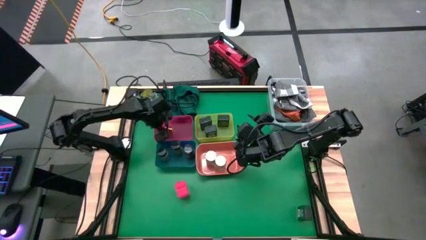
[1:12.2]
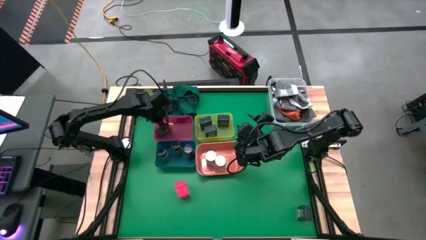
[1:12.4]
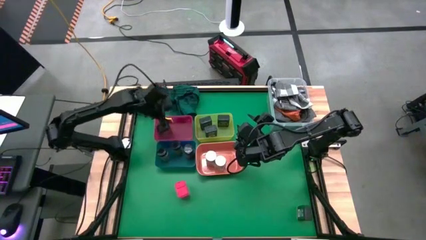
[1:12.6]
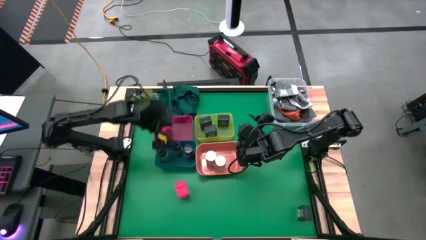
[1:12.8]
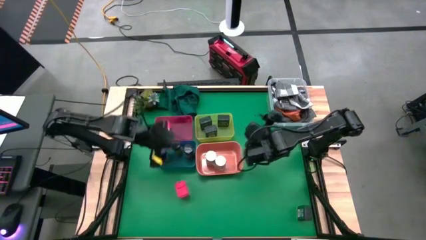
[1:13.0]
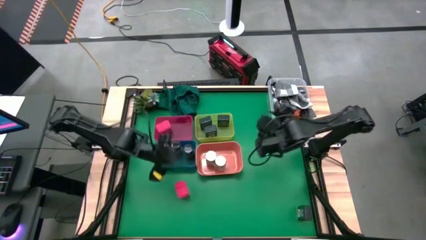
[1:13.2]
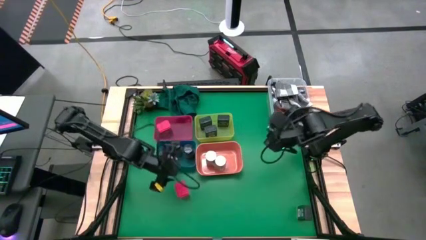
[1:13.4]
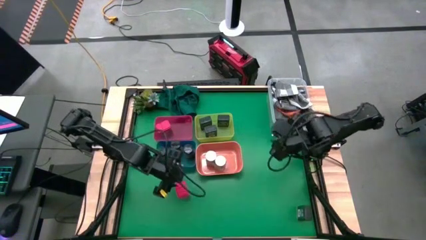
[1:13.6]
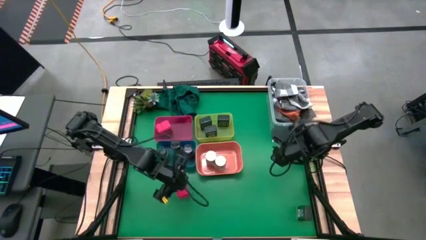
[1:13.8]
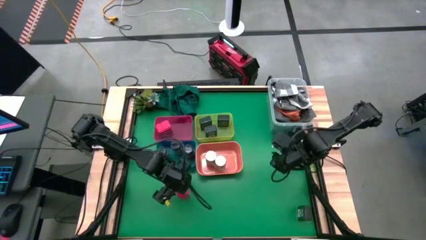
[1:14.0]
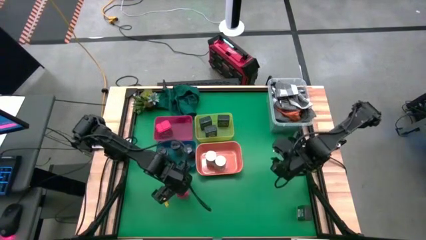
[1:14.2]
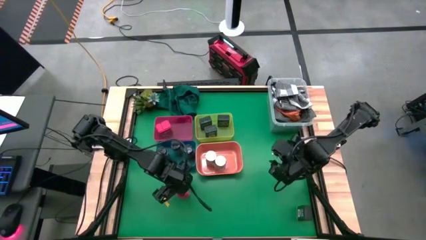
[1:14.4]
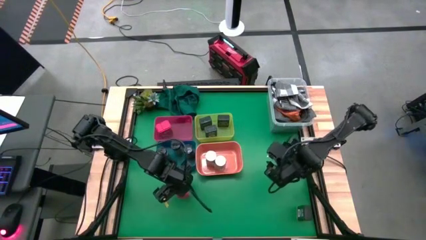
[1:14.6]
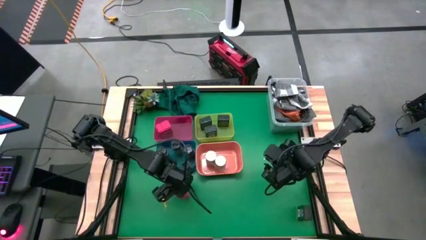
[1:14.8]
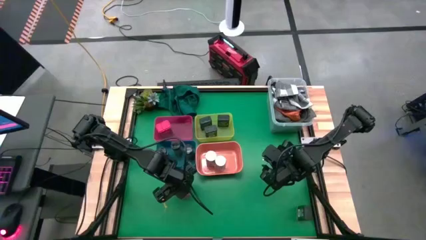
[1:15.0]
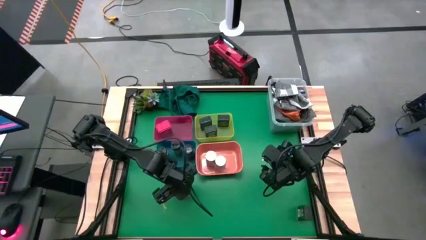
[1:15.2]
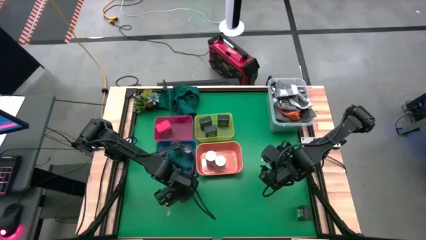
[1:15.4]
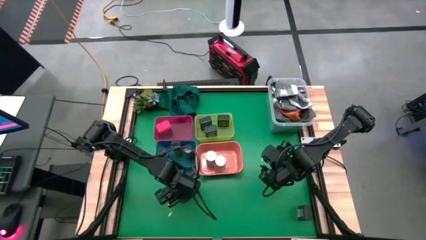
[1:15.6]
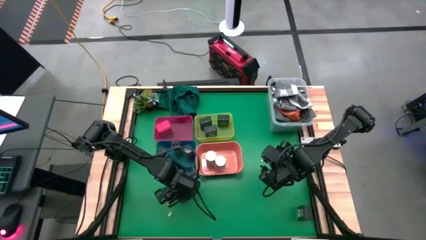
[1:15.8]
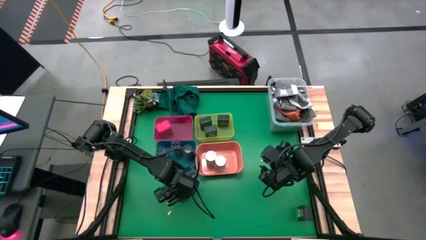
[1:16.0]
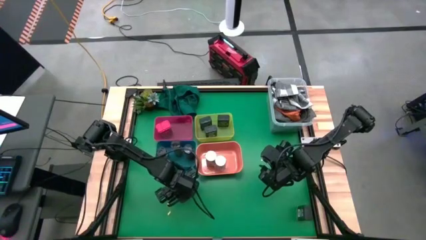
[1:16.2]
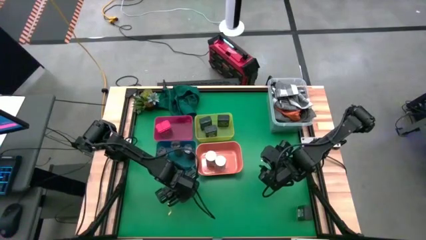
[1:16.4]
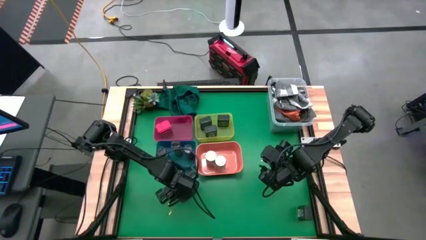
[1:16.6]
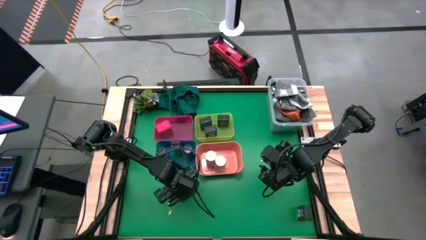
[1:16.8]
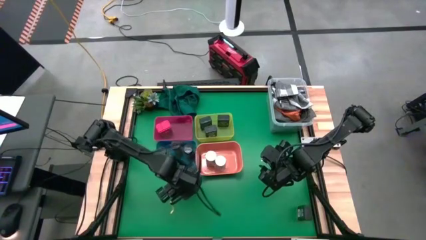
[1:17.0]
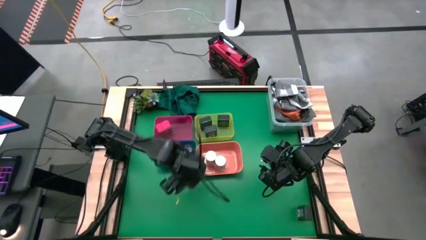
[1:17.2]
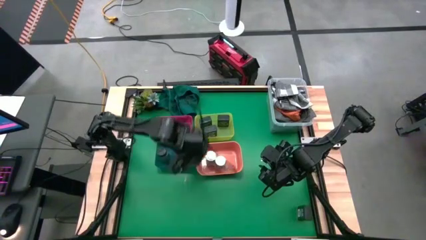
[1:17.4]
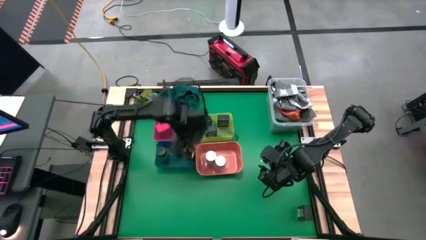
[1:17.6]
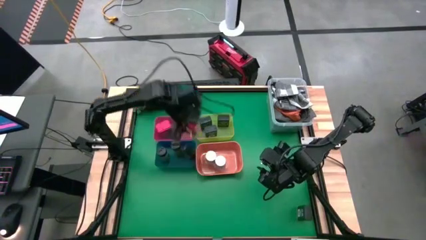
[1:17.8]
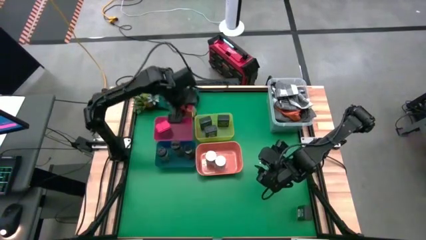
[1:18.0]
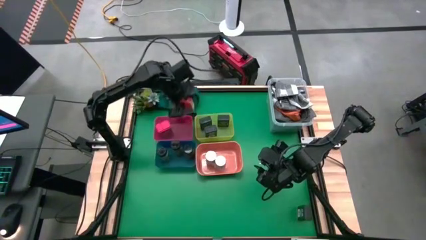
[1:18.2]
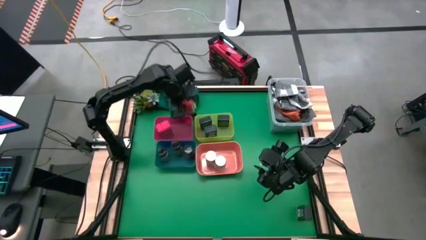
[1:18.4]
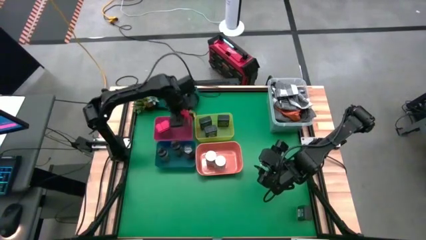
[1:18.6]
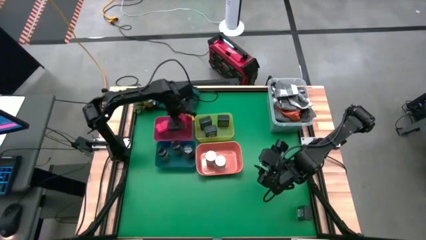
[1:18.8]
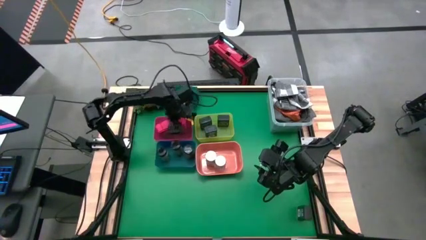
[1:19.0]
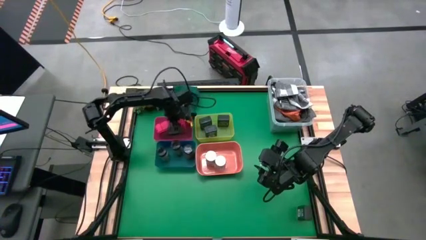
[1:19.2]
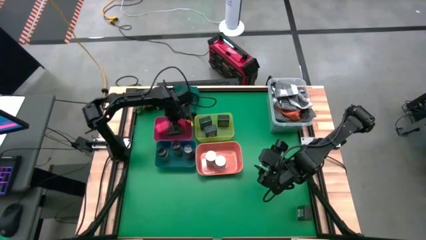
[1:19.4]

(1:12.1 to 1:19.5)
Task: Sort spices by type
Put the red seasoning can into the pink bin

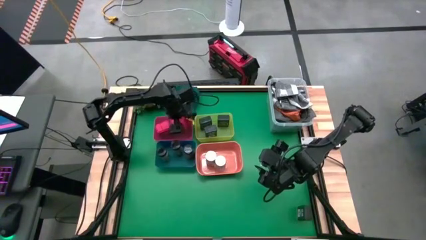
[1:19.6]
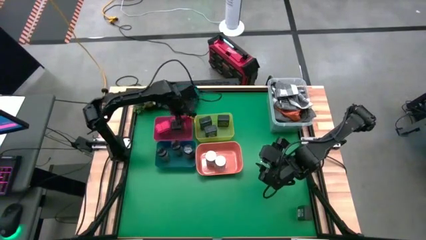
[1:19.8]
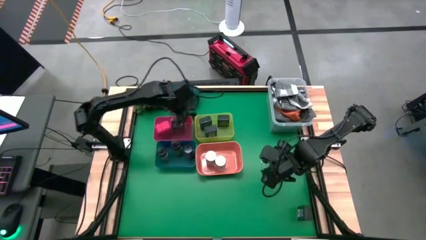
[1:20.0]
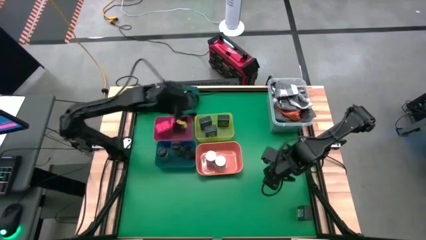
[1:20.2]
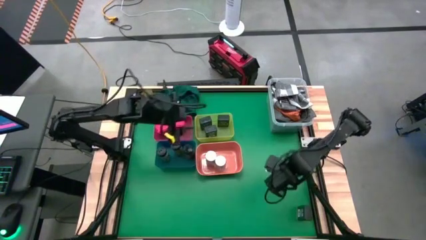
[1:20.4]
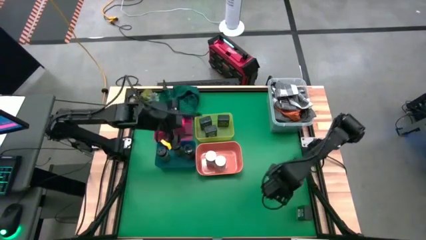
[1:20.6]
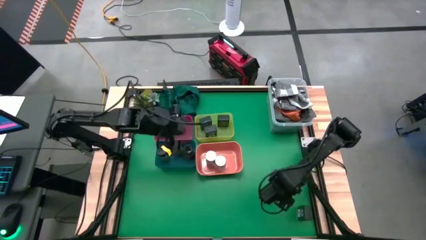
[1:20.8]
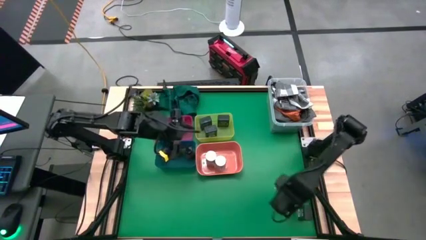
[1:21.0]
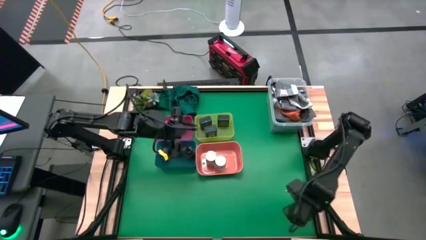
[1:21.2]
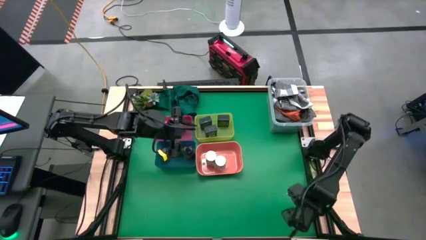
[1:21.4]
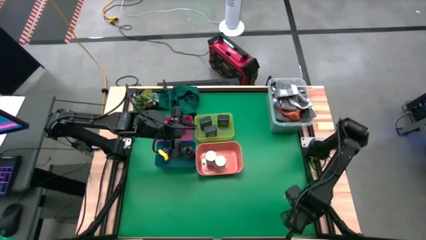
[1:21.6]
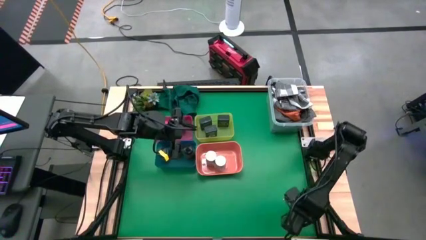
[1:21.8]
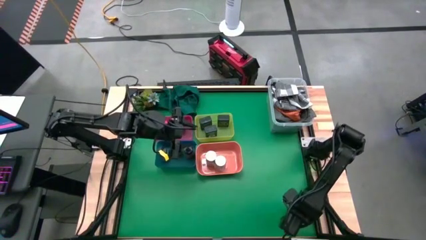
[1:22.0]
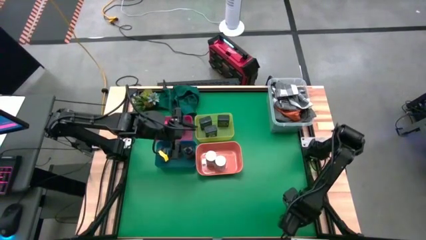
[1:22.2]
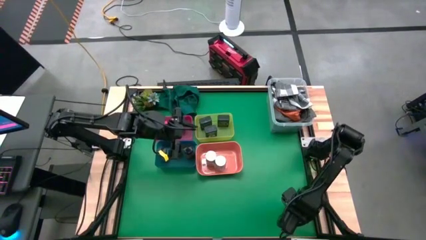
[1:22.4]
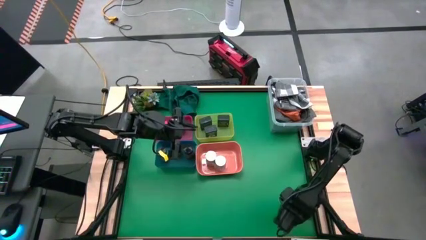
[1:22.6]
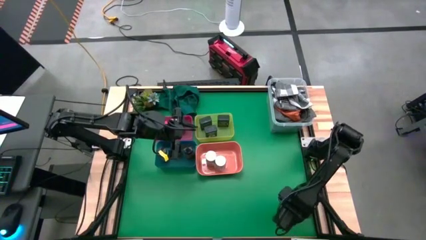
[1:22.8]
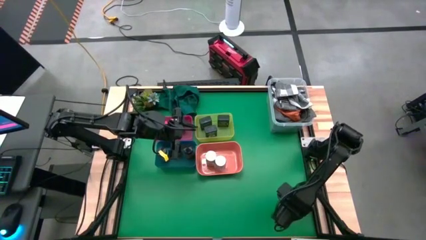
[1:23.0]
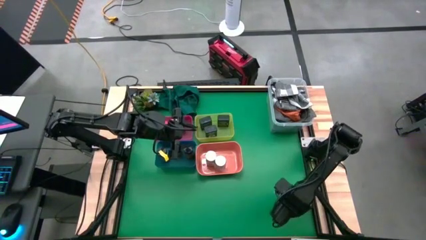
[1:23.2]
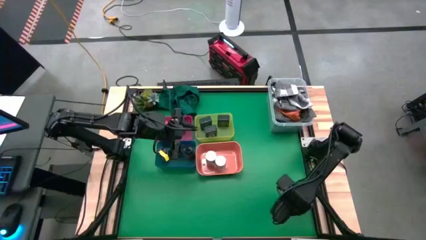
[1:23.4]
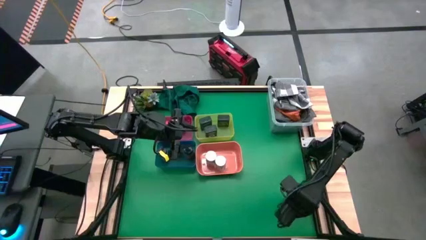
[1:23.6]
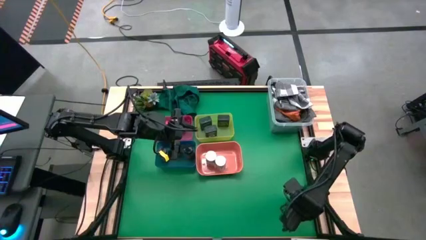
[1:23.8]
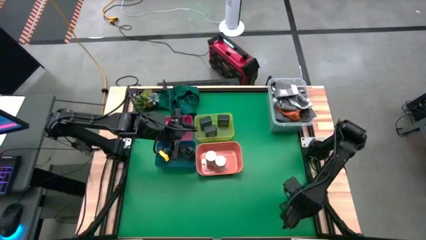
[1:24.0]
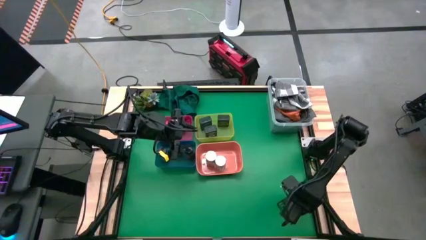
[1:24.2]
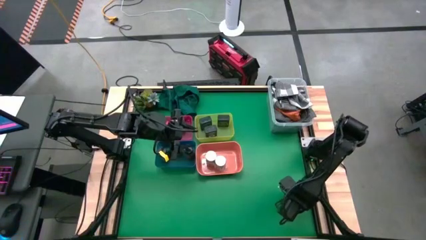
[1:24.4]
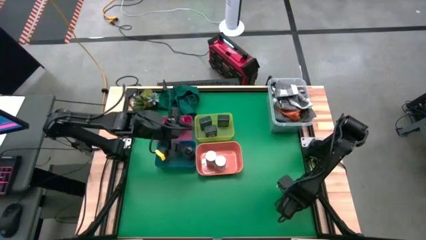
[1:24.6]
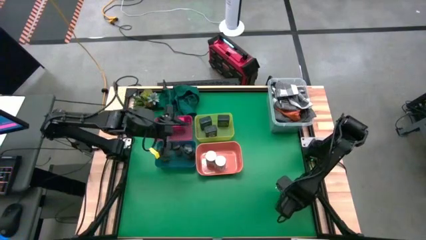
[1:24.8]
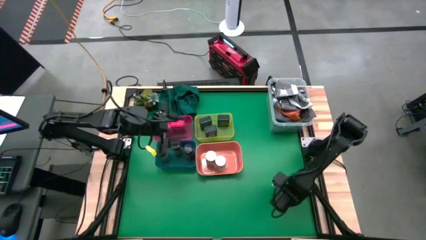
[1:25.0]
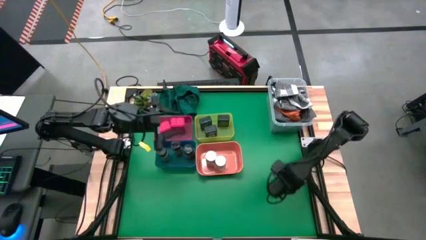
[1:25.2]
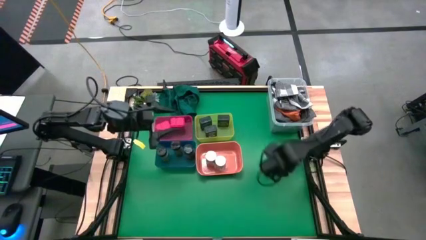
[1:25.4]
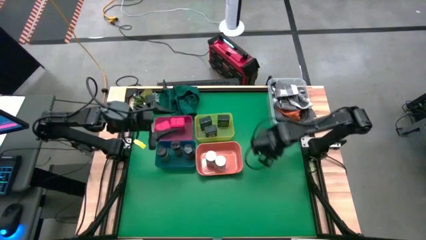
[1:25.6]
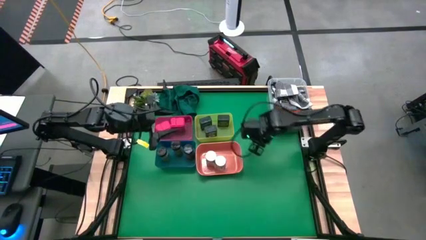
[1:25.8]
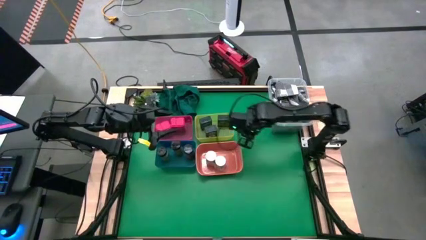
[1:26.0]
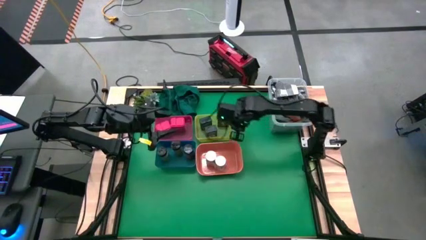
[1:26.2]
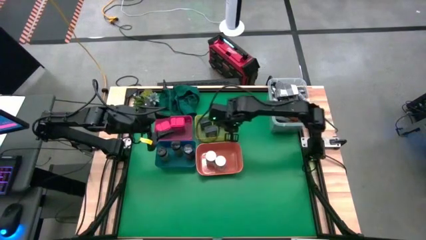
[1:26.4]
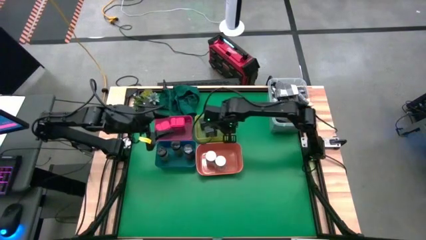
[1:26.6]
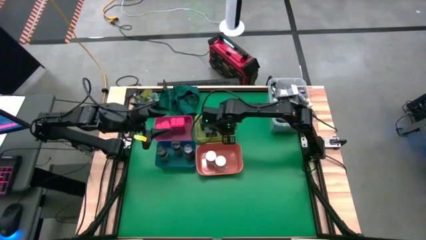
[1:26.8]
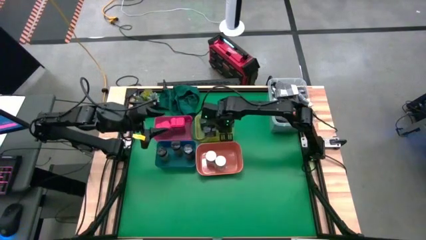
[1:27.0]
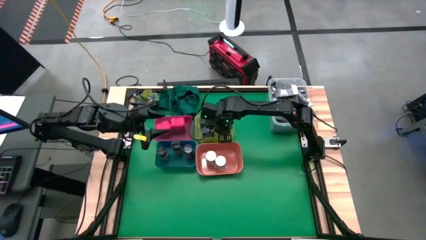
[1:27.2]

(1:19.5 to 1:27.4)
Put the black seasoning can into the yellow bin

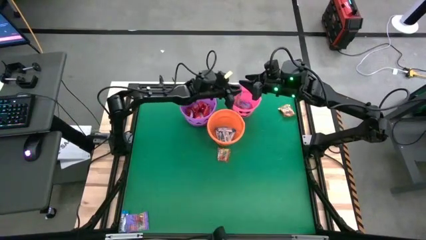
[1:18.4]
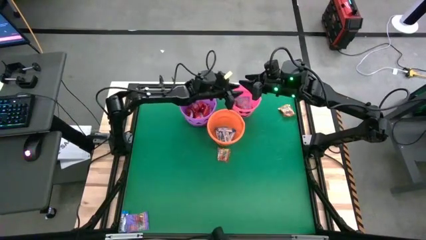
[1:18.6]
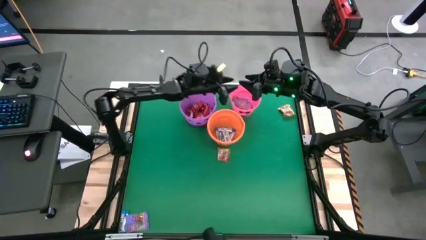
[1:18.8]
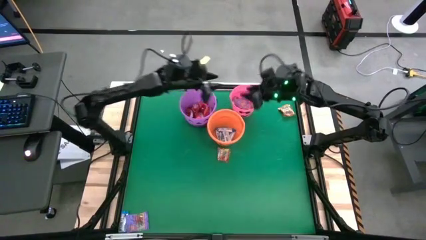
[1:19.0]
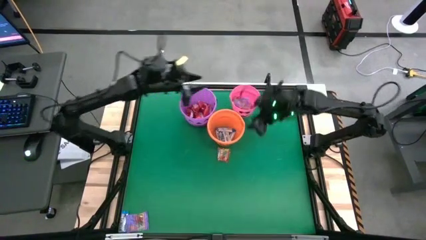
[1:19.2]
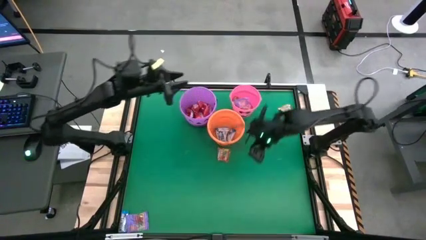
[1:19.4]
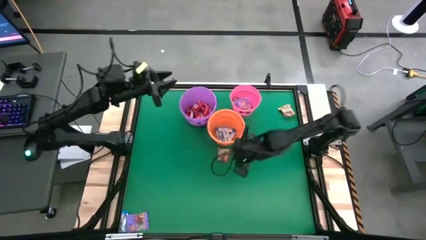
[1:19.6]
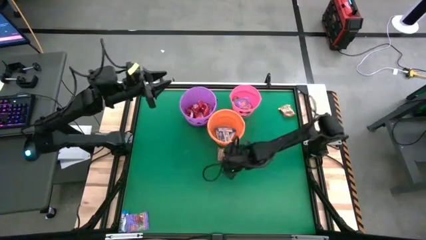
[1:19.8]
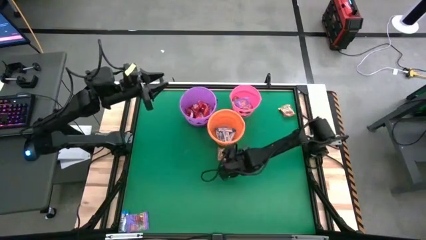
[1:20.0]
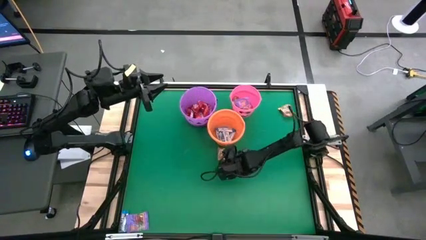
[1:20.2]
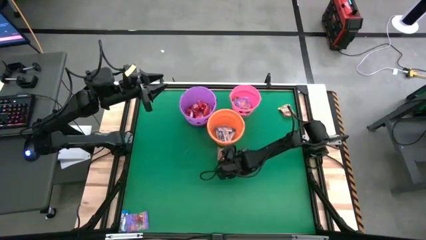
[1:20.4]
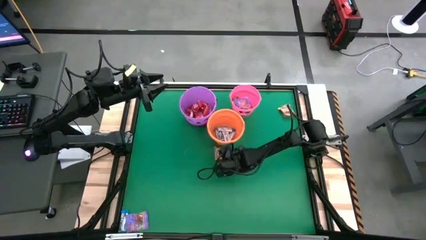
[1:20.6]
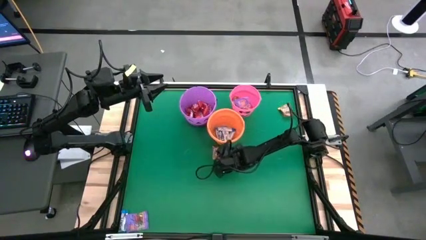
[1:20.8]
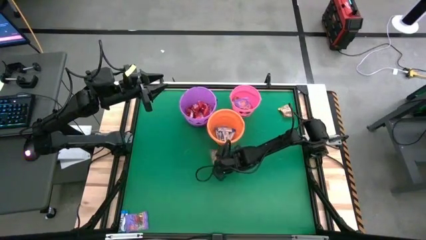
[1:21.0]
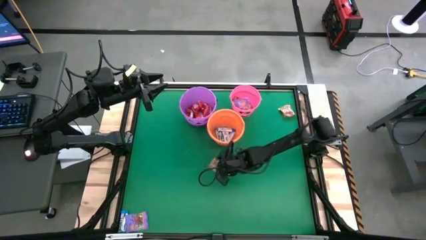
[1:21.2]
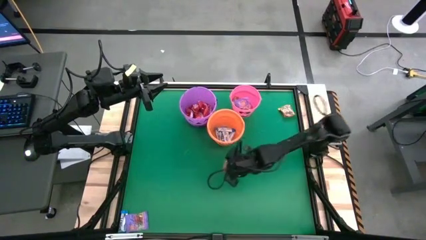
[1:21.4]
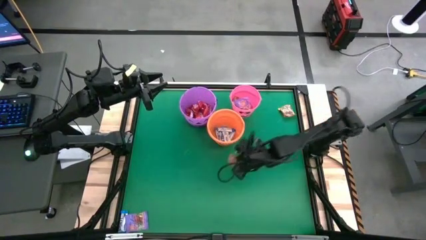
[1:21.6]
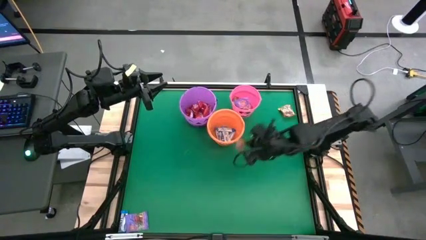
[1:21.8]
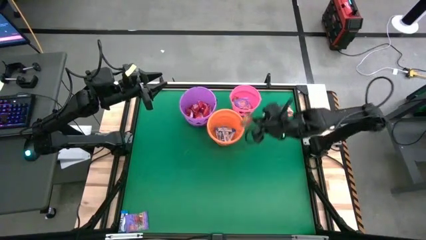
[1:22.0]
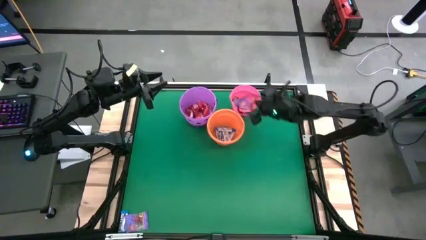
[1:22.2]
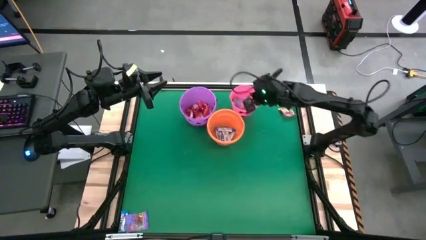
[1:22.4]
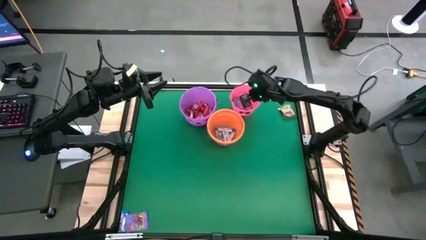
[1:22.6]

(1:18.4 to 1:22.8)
Task: Sort candy by brand, put in halloween buckets
Put the gold gummy candy into the pink bucket
